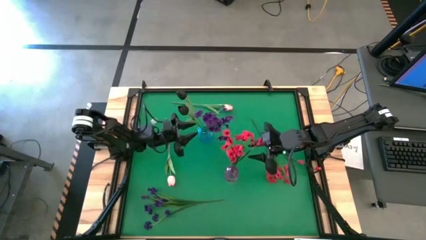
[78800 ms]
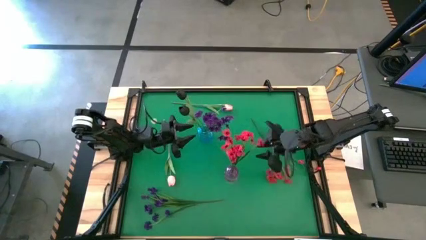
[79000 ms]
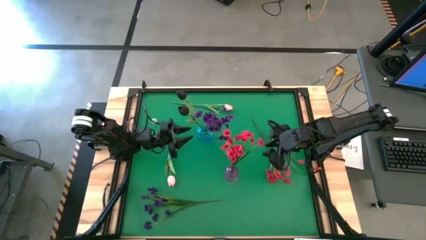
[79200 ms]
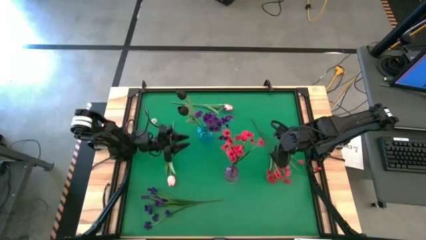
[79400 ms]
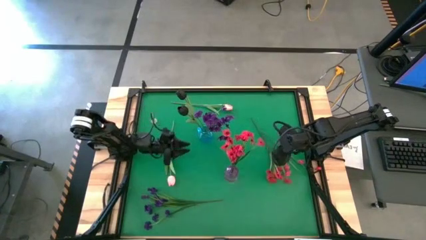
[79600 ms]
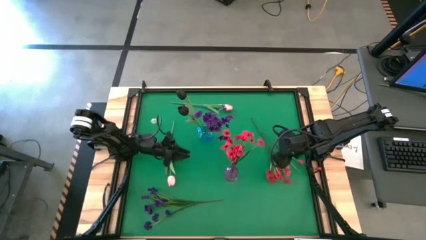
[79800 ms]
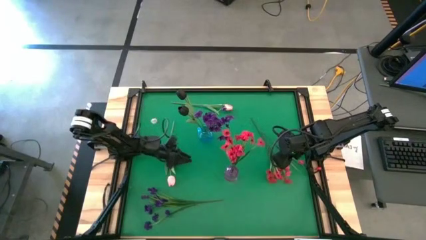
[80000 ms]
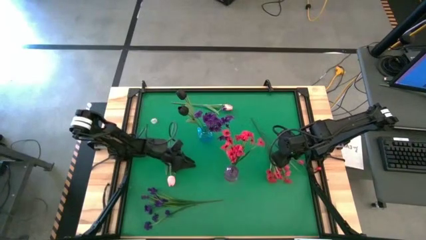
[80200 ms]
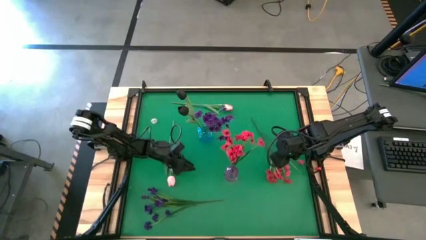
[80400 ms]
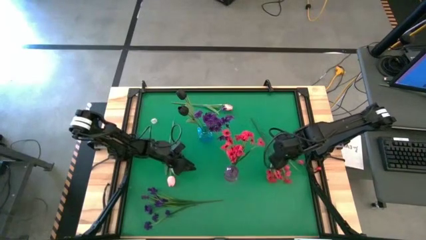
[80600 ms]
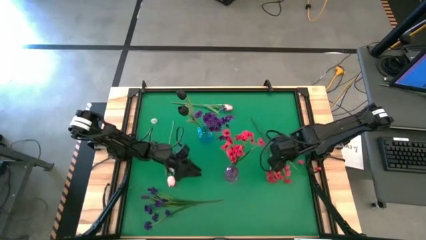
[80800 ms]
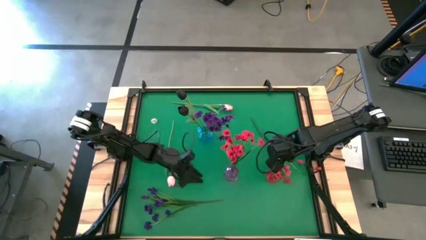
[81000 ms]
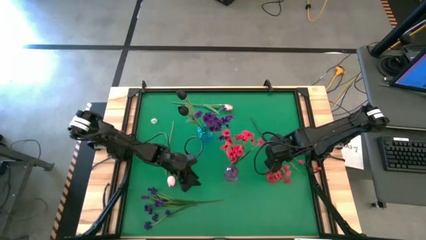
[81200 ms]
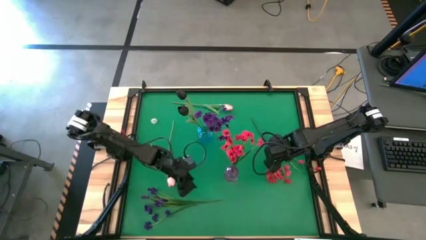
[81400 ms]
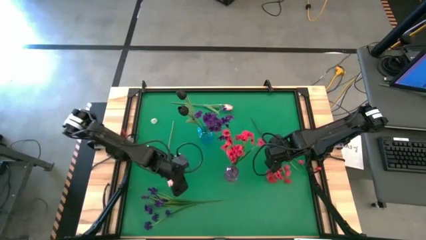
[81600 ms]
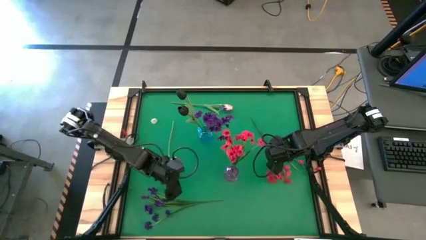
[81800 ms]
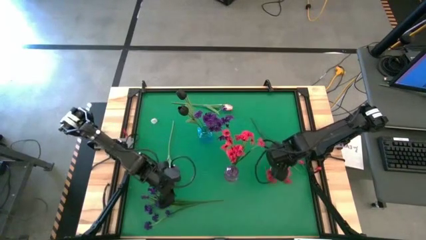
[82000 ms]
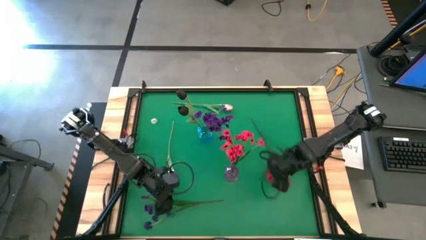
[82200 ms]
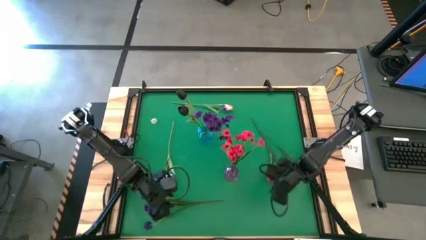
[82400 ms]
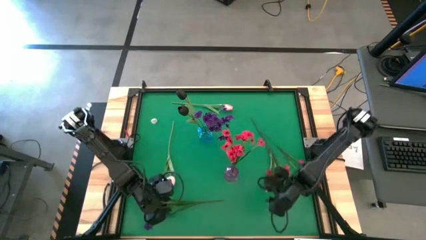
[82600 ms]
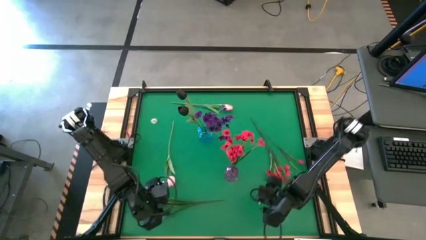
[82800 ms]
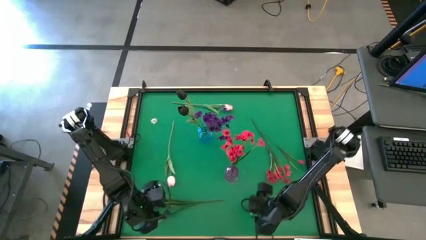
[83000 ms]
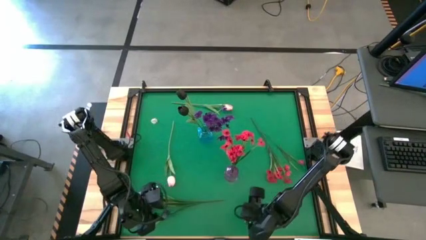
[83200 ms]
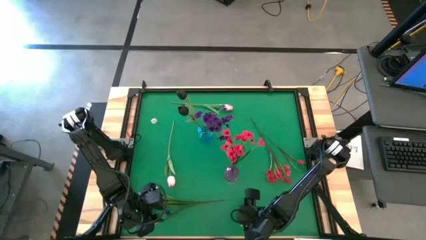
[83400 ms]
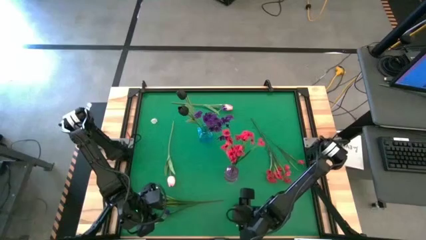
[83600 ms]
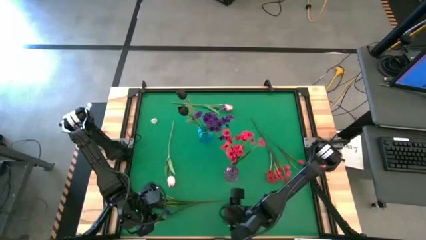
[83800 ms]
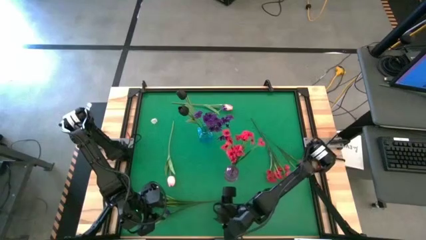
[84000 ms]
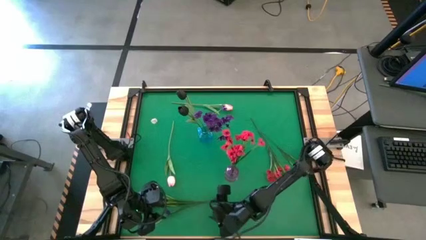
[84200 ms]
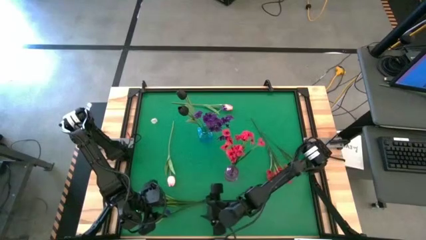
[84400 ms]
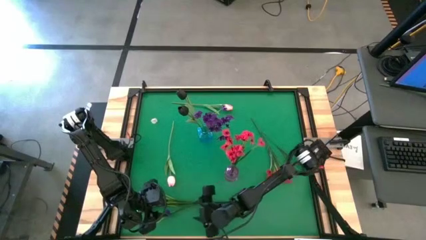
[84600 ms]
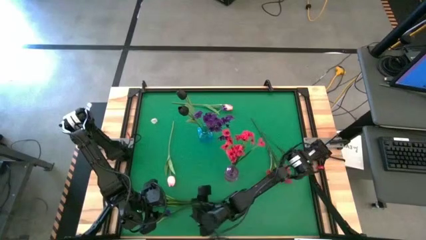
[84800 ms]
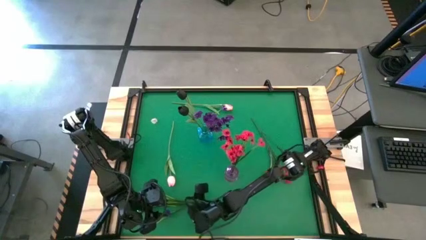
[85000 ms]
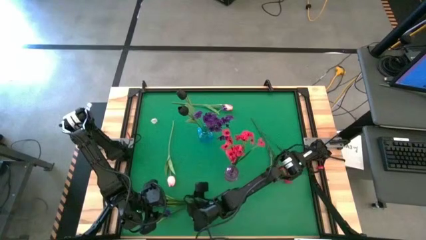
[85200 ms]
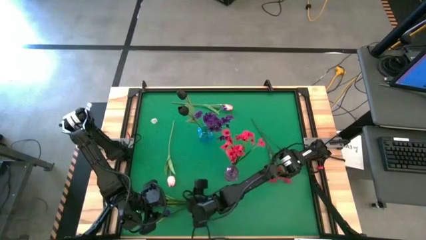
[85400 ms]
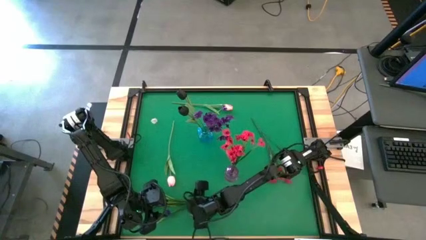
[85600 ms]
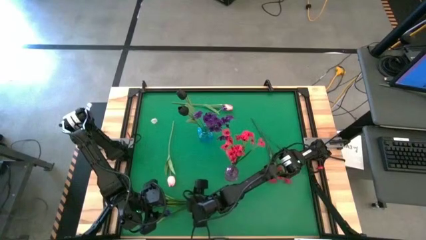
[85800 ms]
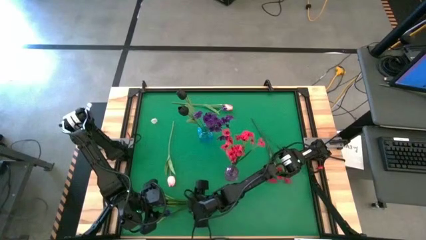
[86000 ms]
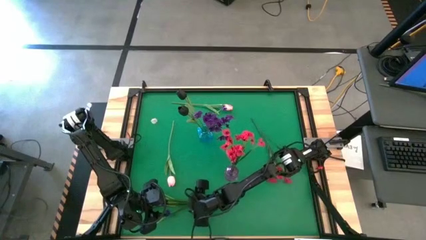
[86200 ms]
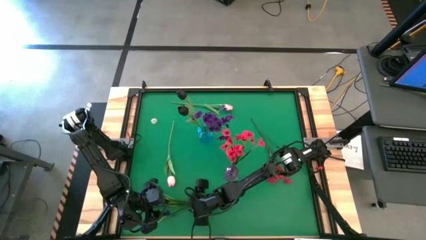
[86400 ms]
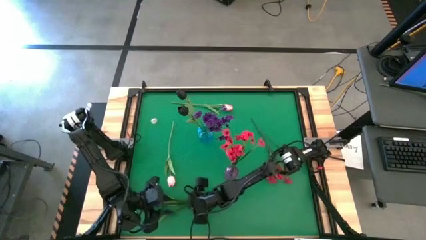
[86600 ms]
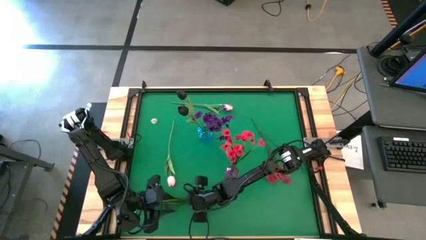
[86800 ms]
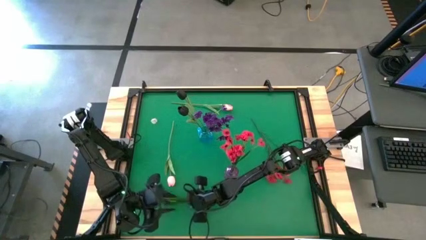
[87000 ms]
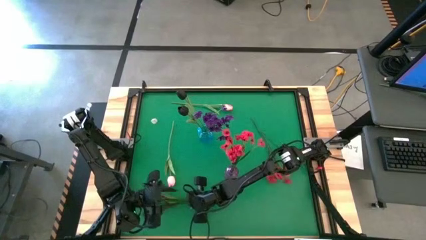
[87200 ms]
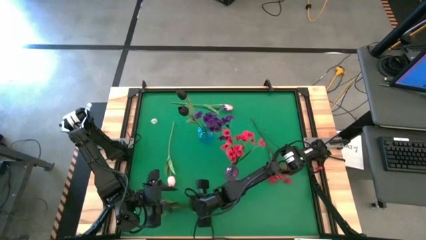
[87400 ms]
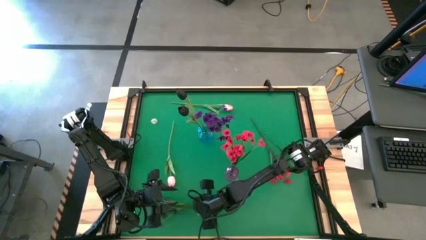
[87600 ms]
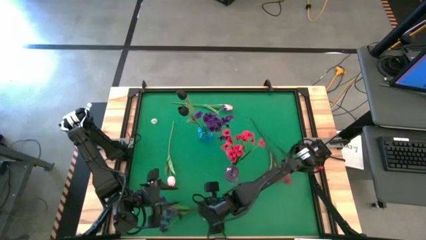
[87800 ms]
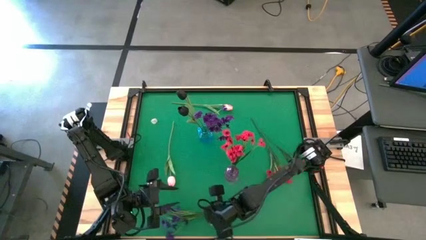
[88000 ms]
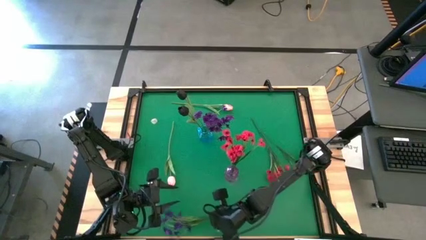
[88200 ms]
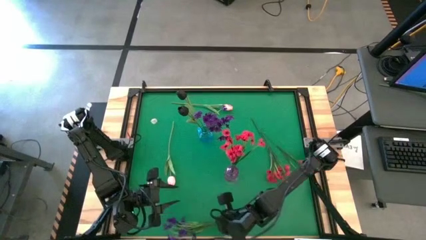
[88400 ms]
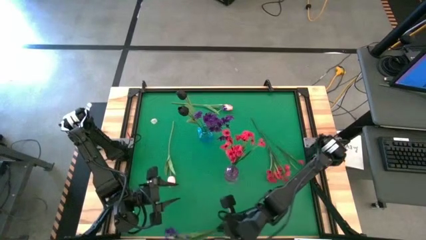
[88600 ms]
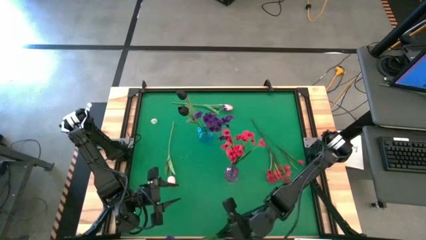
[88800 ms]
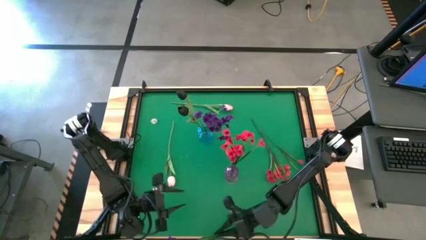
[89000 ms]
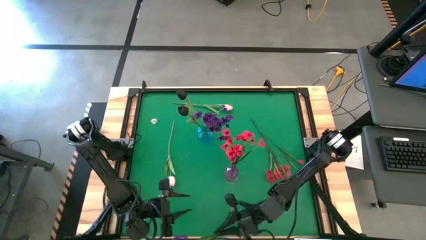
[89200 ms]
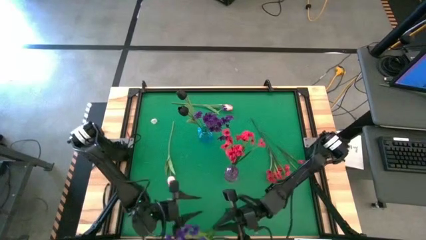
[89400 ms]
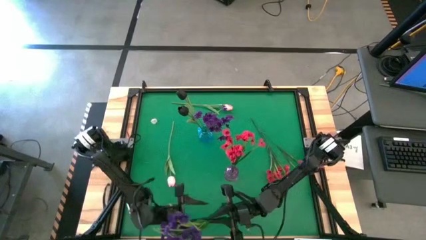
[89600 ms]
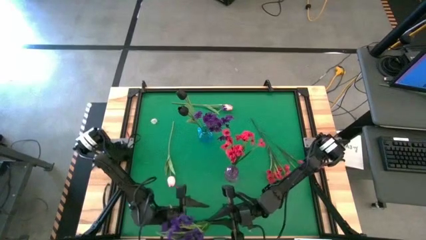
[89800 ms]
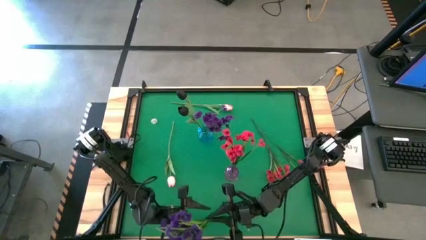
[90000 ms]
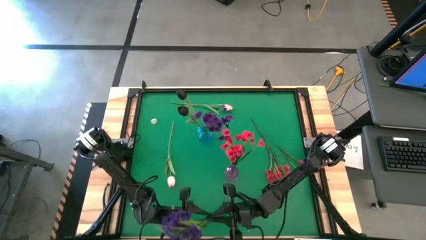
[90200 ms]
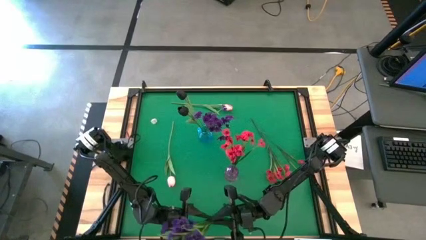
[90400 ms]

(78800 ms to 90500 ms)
Task: Sort flowers into vase by color
Put the purple flowers into the blue vase
